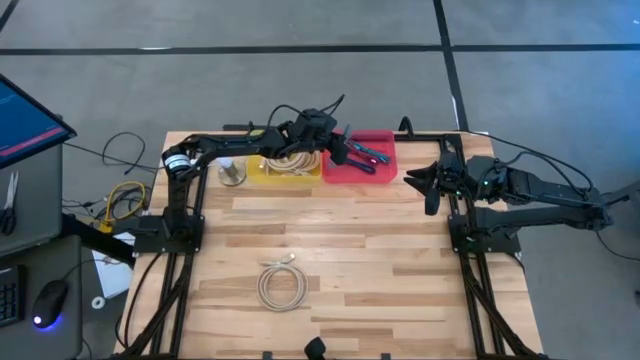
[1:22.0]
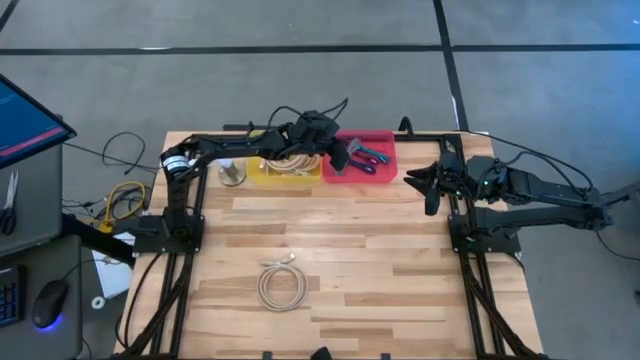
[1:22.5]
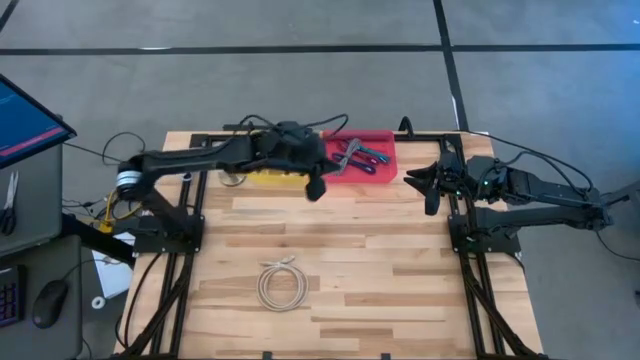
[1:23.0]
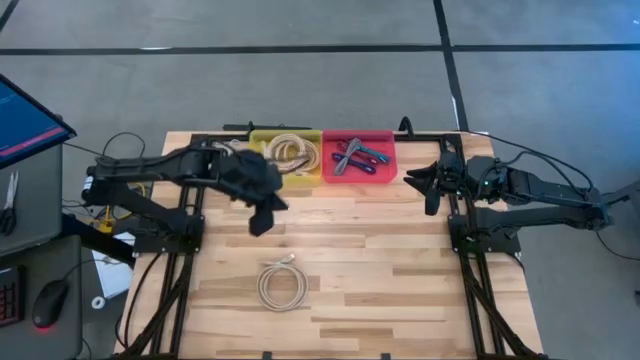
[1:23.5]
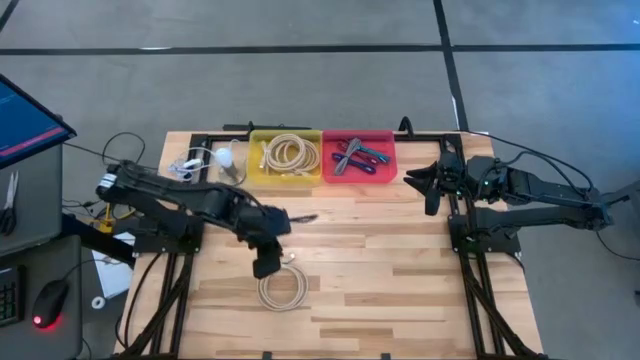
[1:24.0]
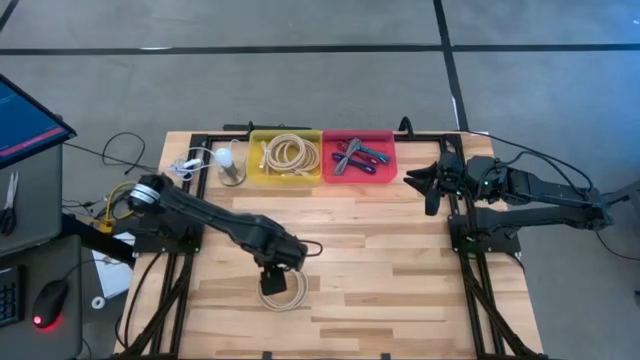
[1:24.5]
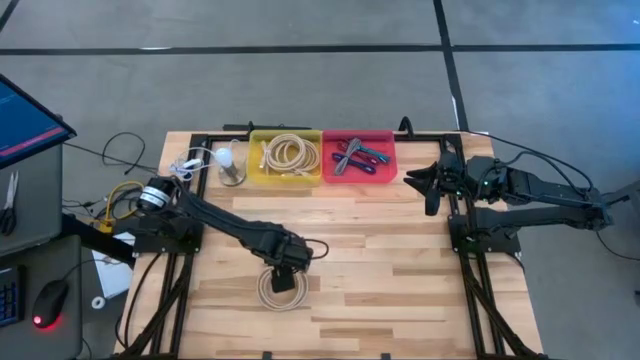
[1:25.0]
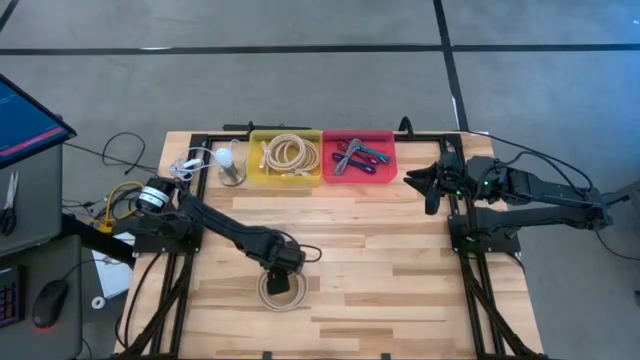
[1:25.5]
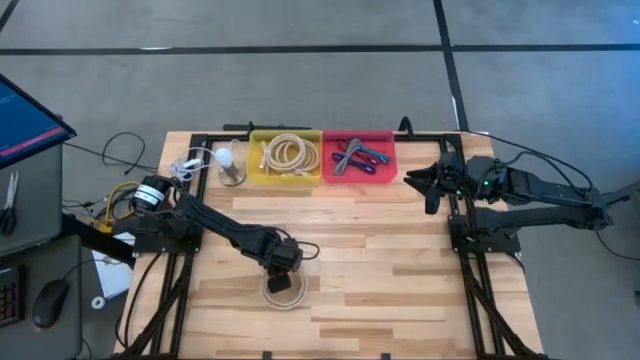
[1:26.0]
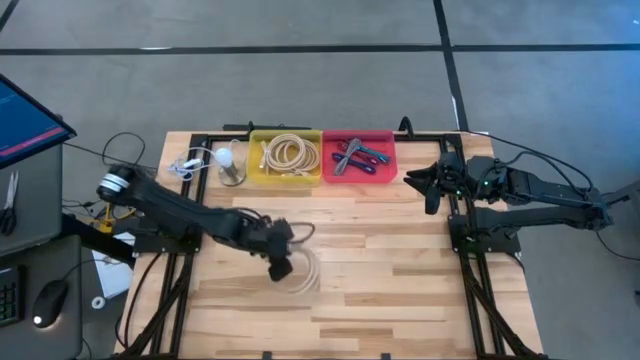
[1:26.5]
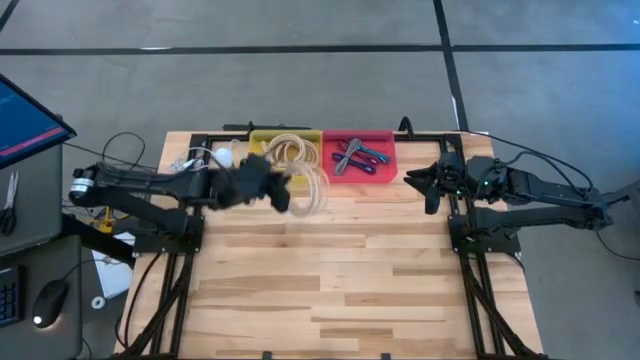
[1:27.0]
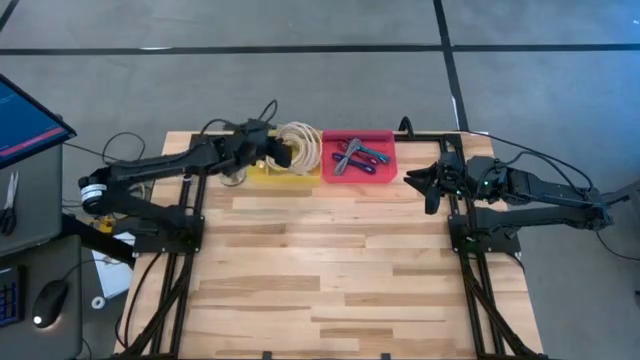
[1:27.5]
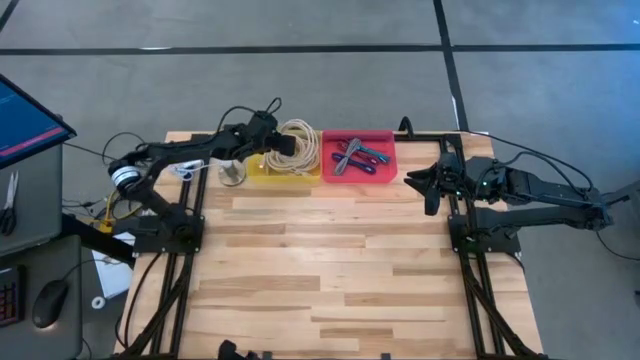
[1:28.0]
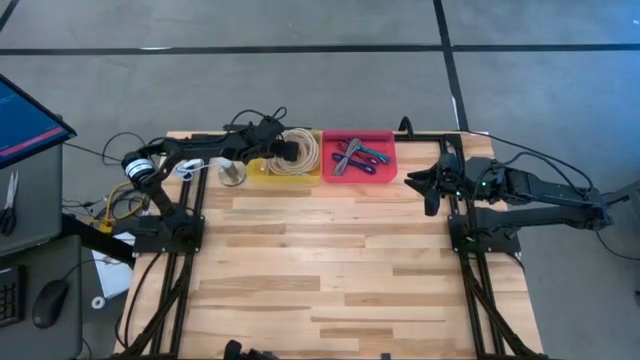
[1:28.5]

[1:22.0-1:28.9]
Task: Pick & Place USB Port
Put the large white charger cable into the yellow bin

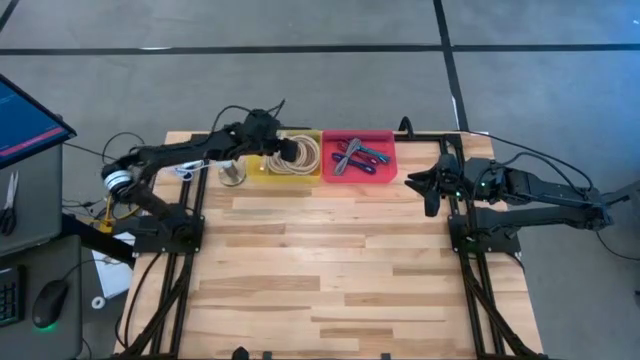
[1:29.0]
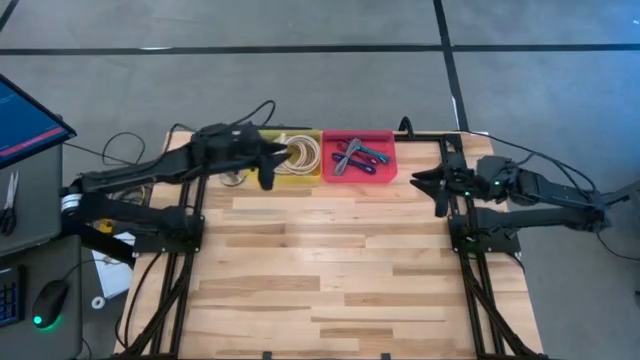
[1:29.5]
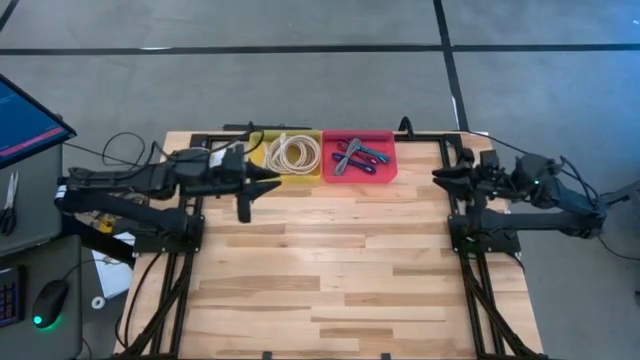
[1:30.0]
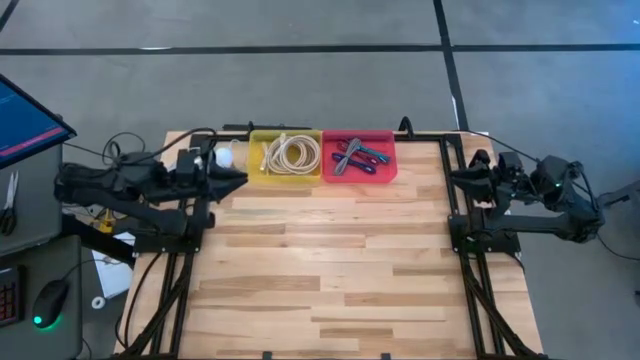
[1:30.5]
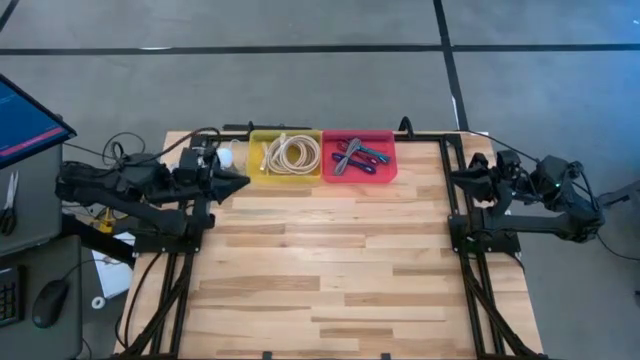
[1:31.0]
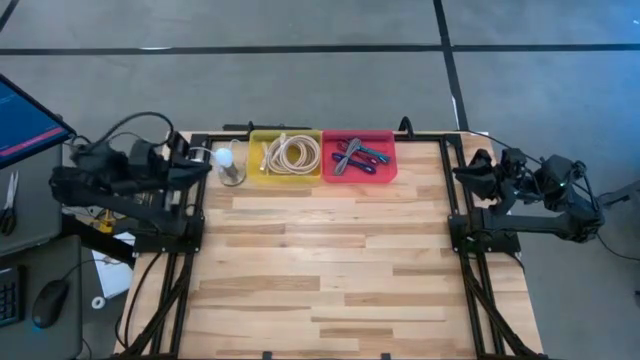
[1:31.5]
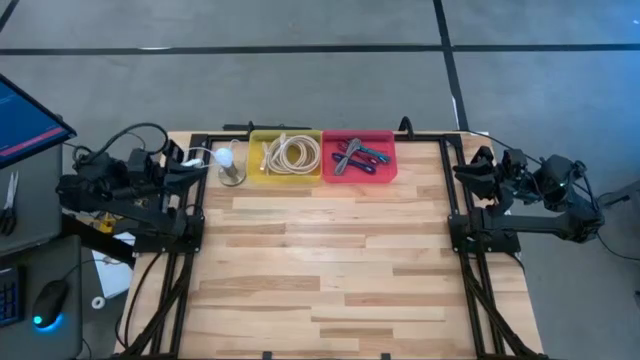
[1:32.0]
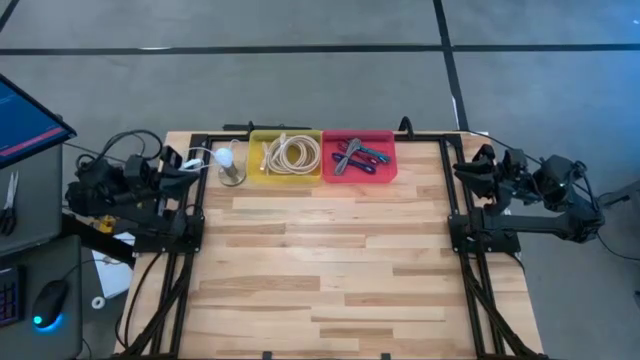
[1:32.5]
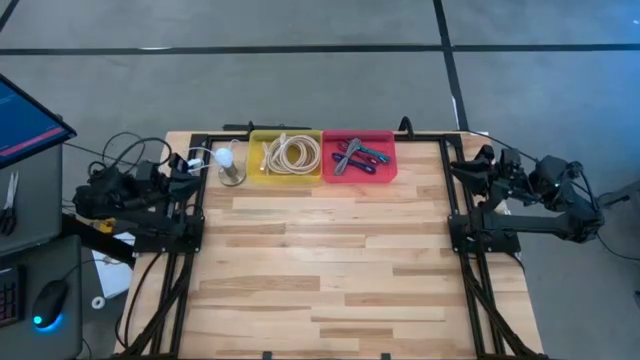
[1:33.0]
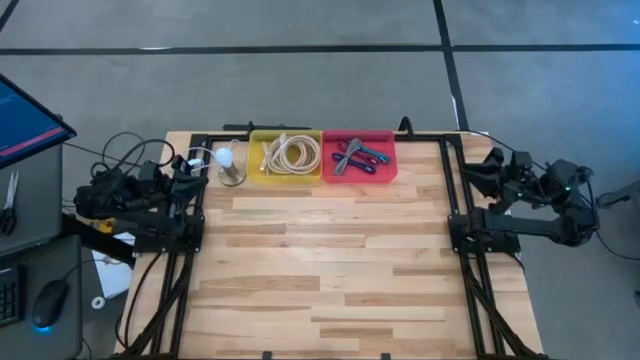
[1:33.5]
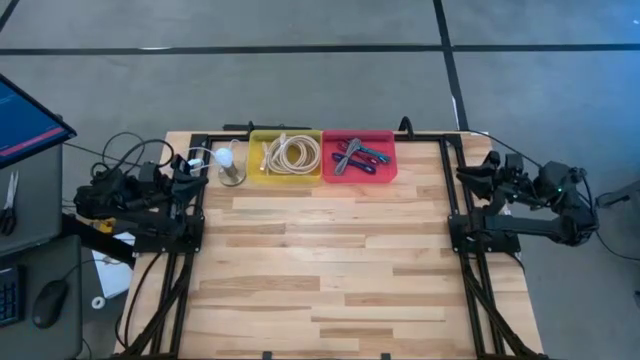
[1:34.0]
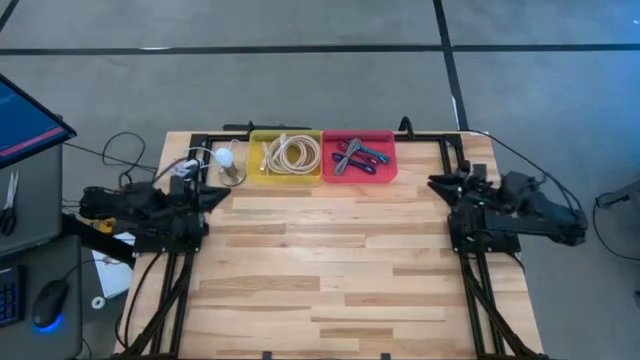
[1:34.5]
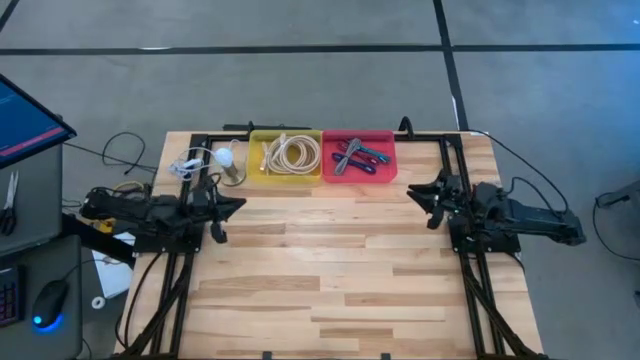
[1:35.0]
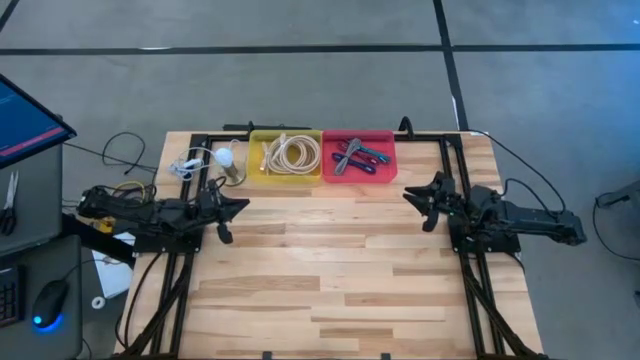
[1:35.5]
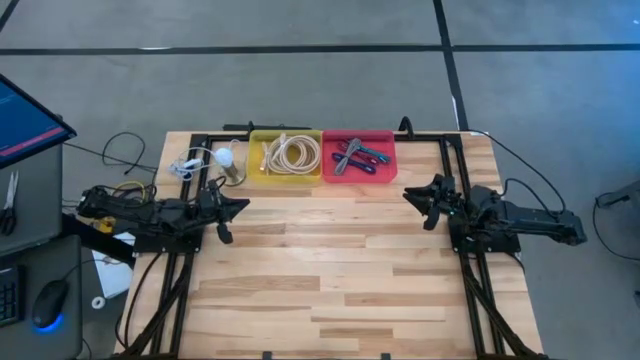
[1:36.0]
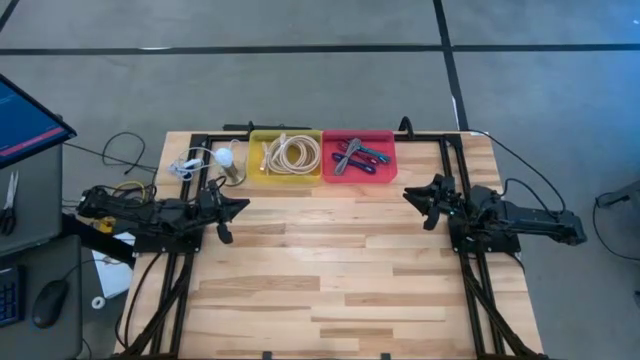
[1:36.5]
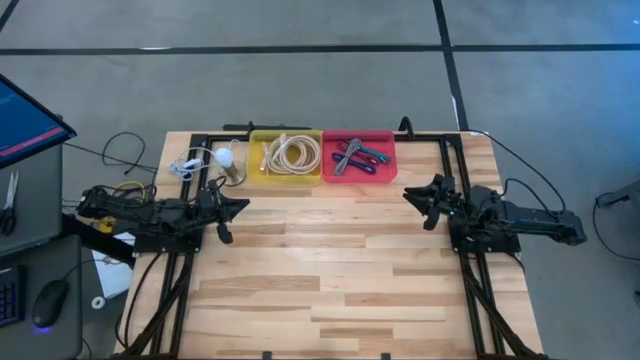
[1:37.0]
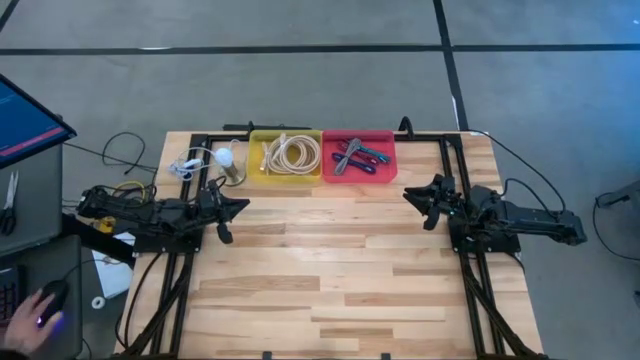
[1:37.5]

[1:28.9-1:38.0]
Return to Home Position

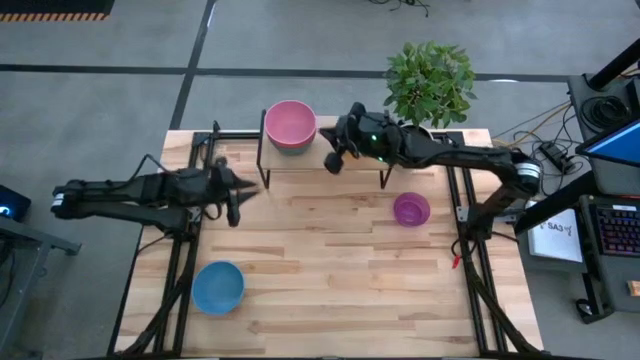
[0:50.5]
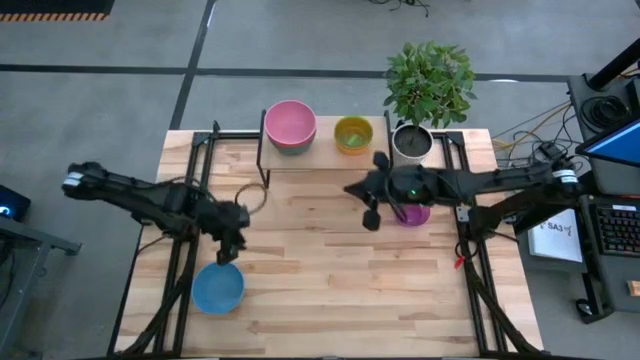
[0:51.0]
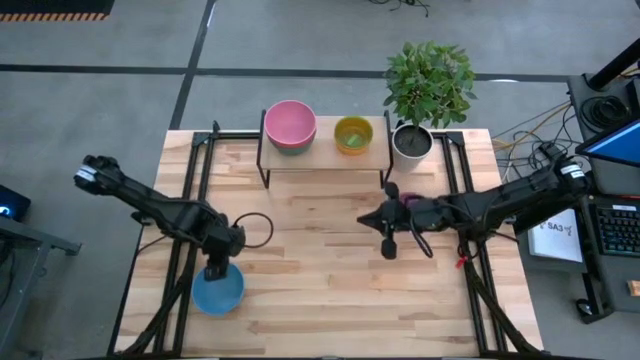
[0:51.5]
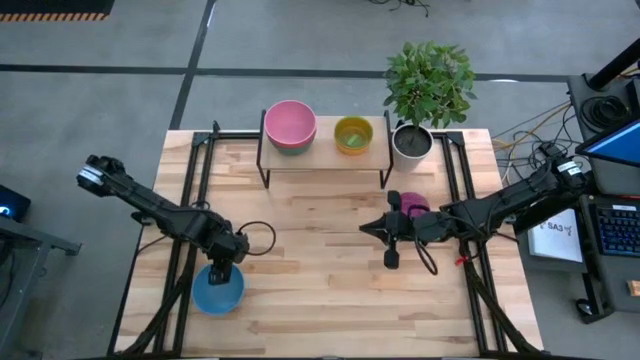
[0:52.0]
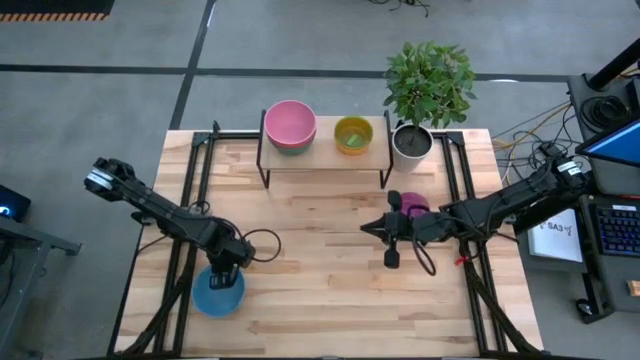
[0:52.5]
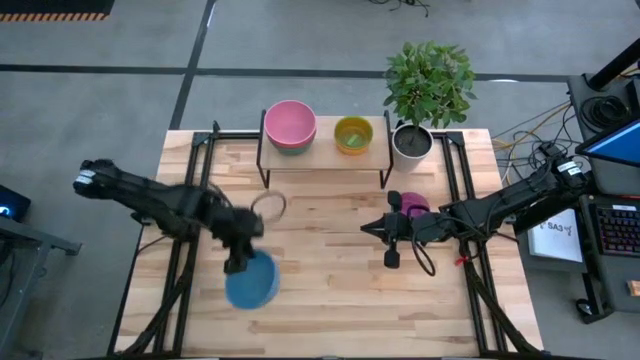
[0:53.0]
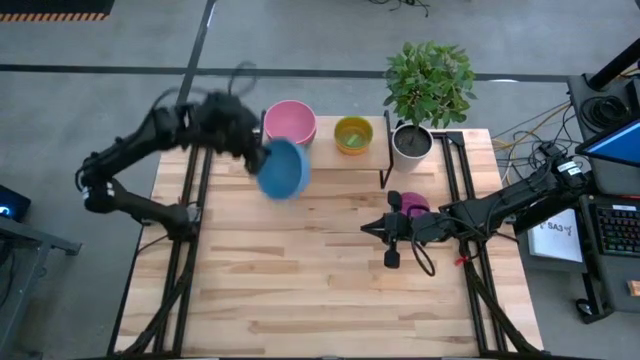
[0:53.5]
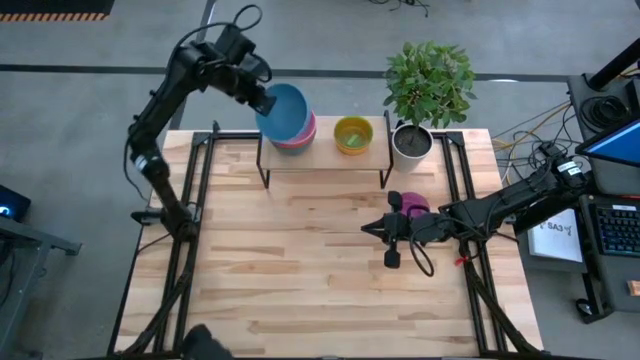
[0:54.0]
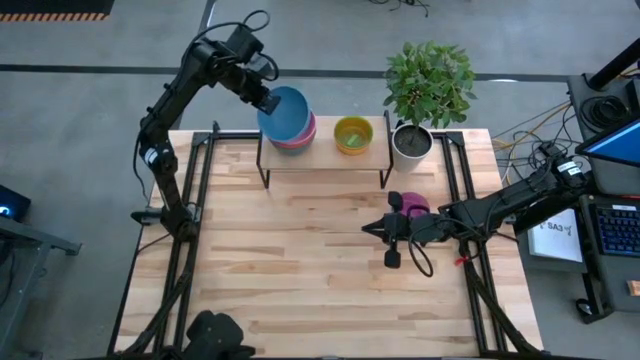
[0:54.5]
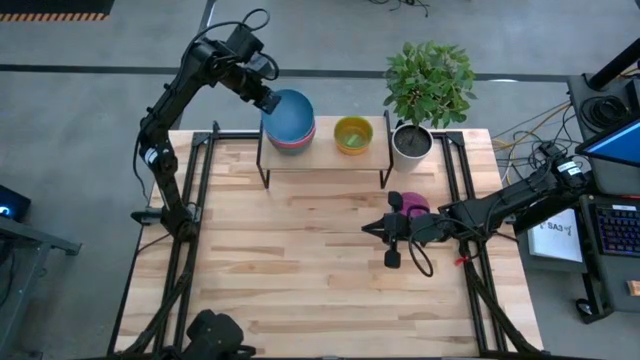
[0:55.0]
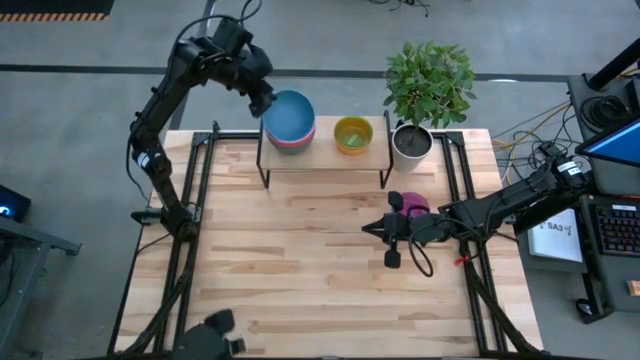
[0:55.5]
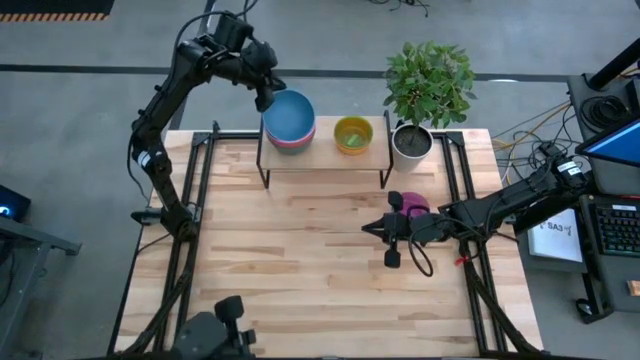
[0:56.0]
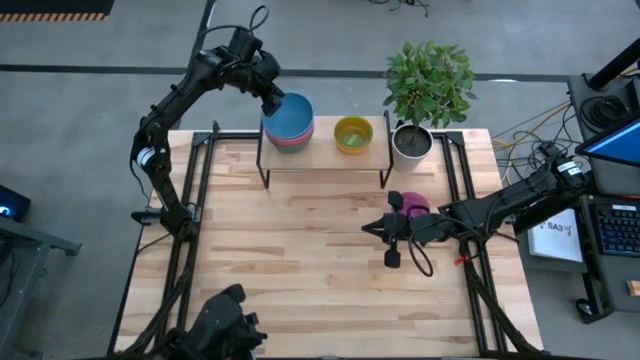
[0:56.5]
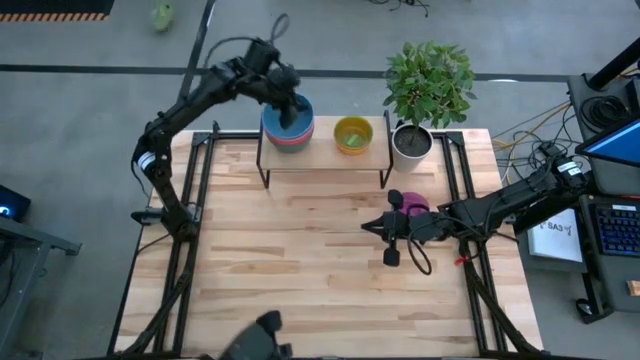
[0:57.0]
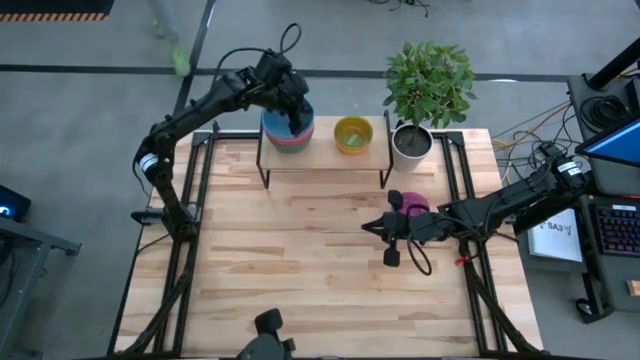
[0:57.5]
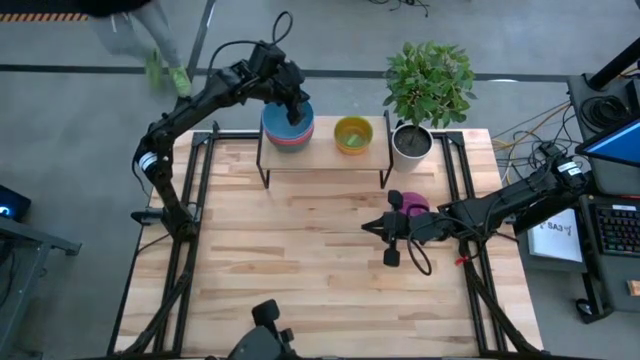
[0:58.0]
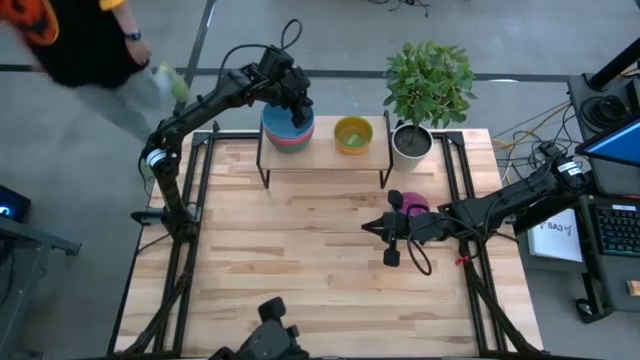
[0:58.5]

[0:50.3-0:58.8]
Task: Place and stack bowls onto a shelf
Stack the blue bowl on the pink bowl on the shelf
